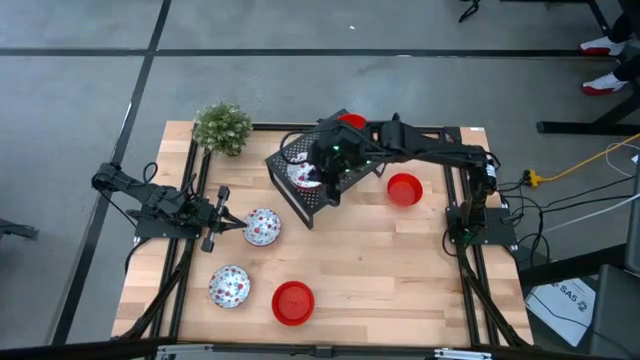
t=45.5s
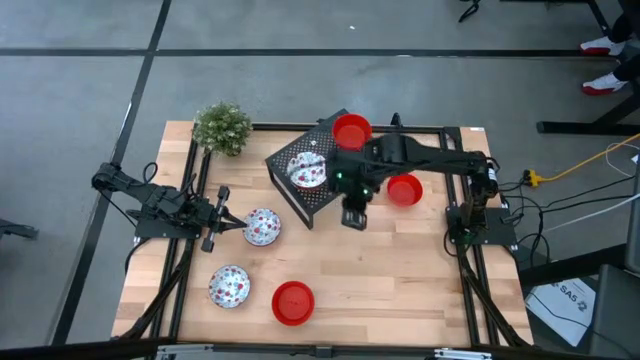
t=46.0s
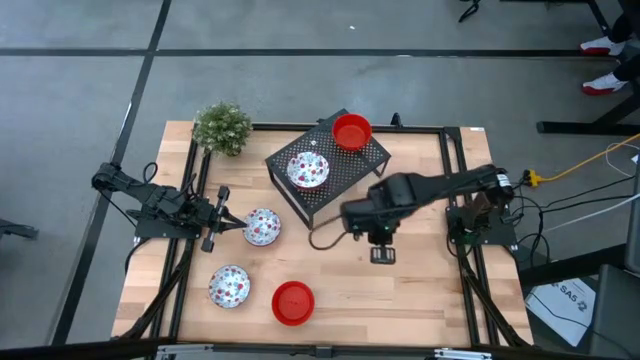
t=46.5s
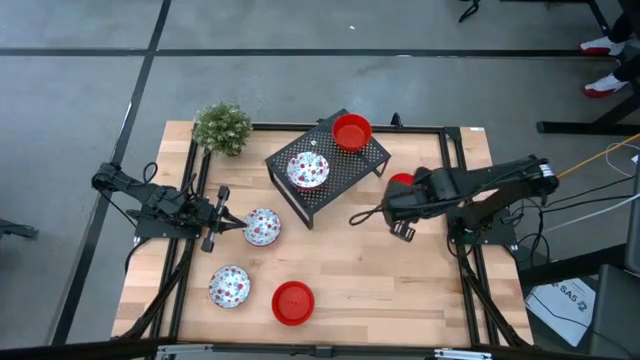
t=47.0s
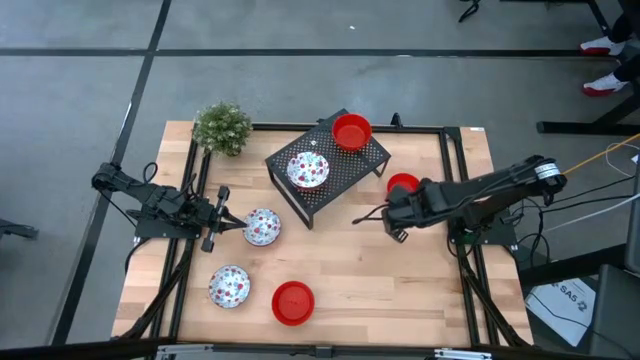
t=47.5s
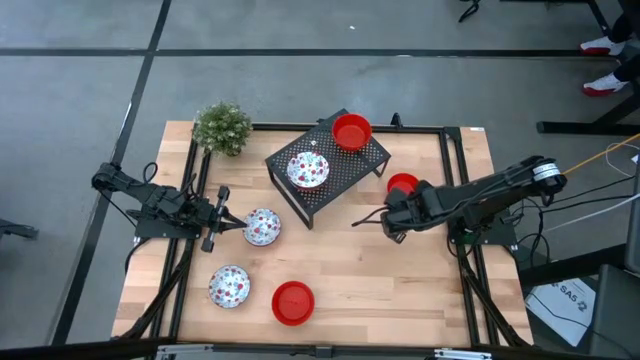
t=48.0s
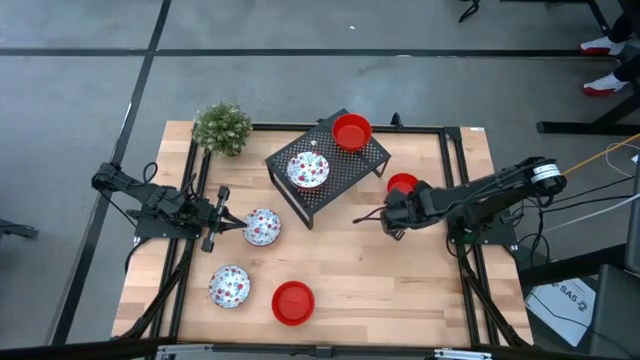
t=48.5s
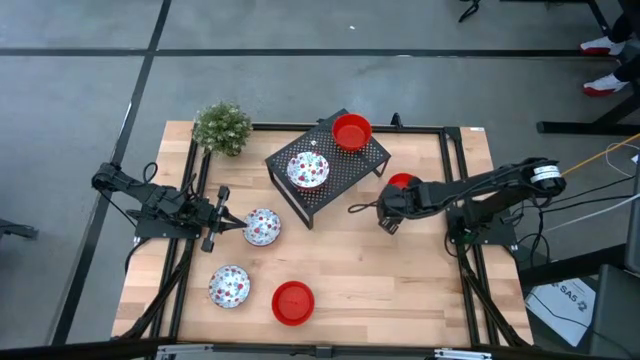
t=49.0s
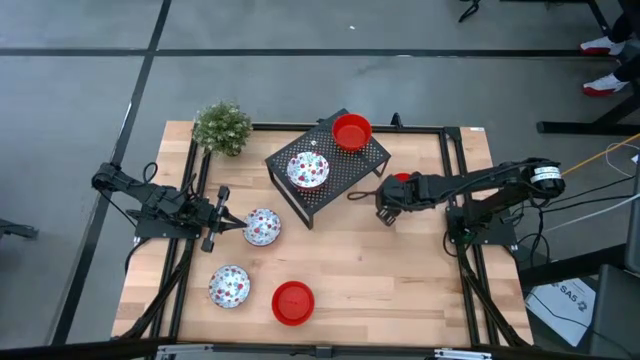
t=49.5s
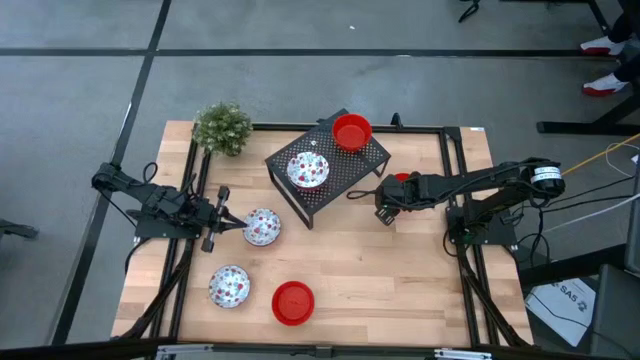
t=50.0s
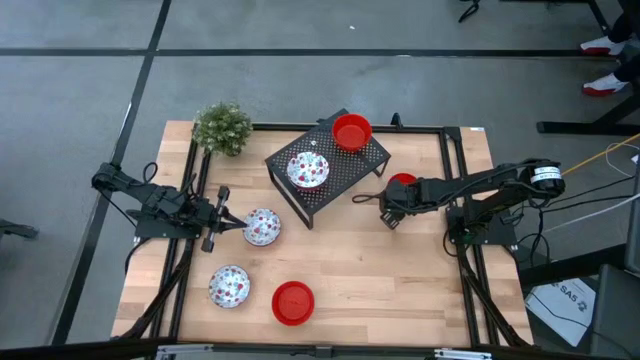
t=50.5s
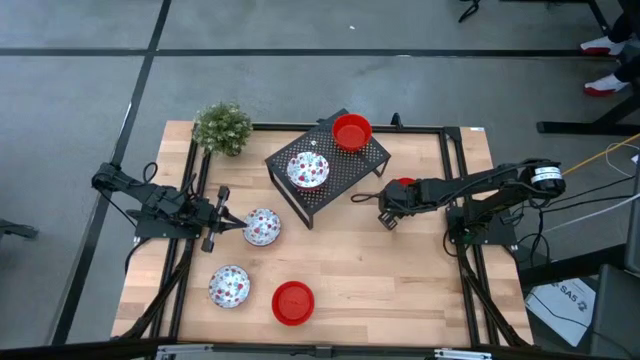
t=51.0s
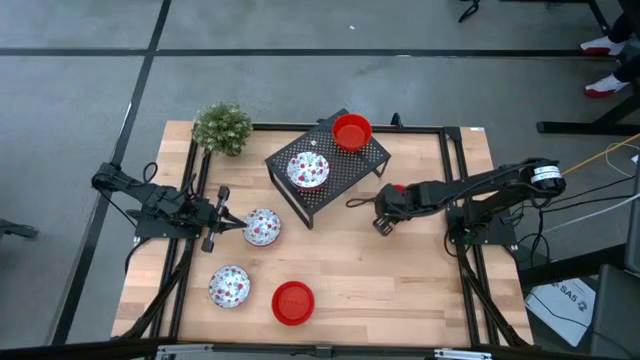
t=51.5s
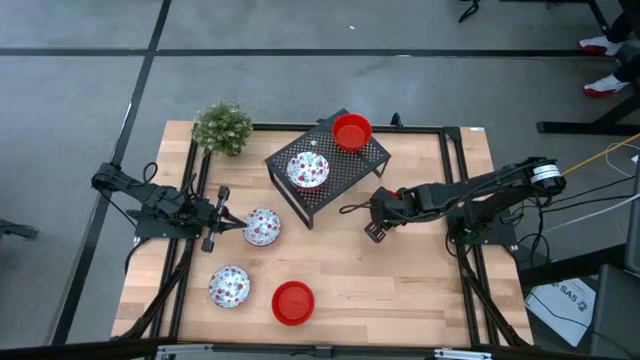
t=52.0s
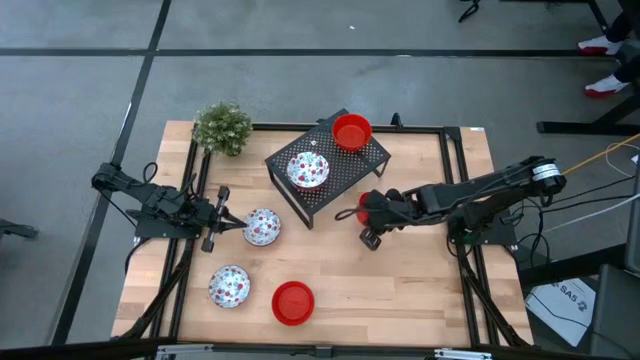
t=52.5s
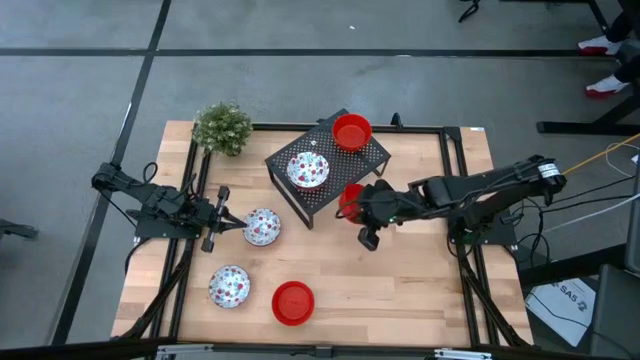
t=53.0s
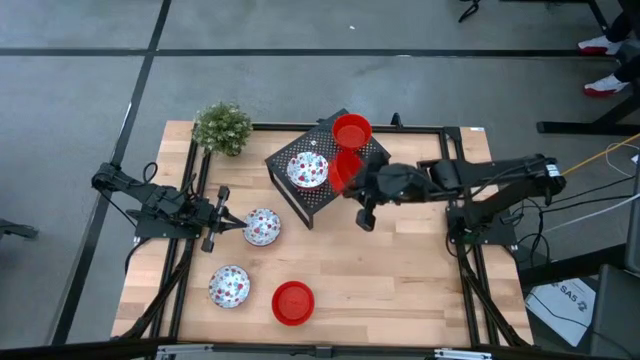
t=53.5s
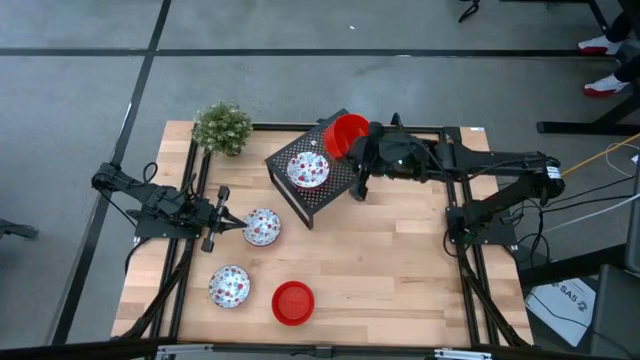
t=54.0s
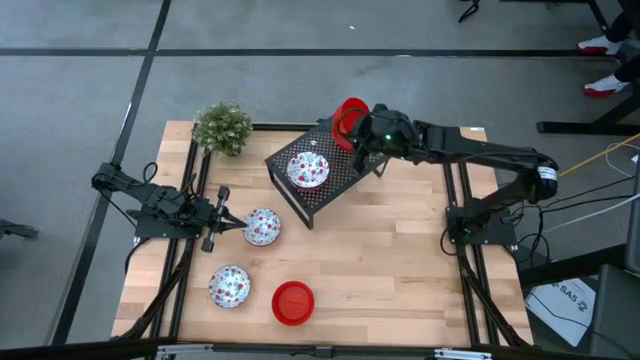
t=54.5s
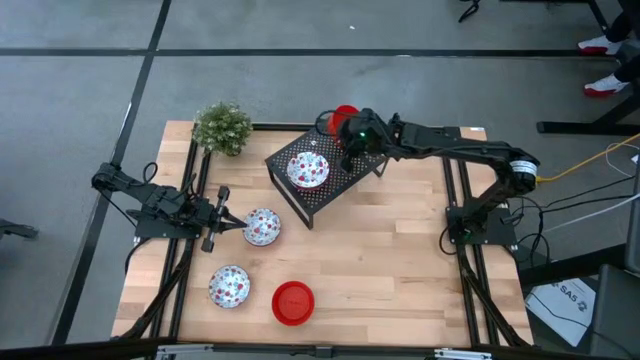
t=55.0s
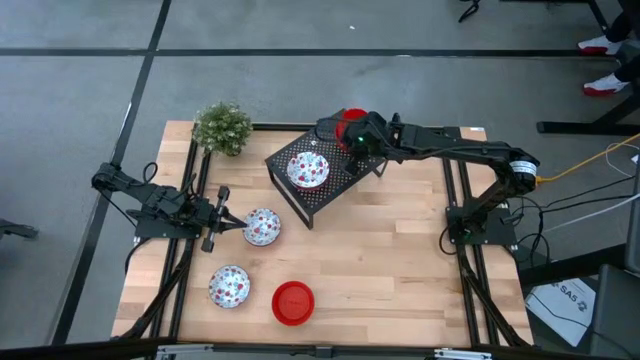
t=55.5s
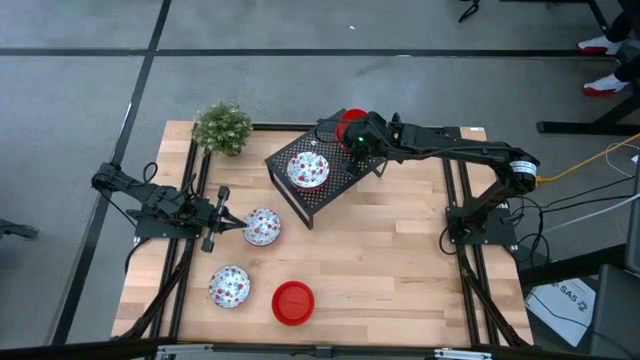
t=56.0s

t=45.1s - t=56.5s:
Task: Pick & Place Mini bowls
Stack the red bowl on the red bowl on the shelf

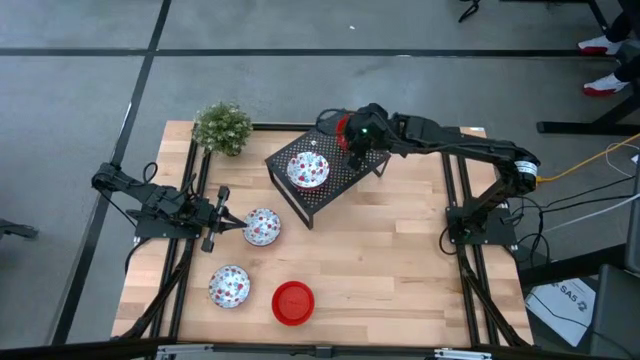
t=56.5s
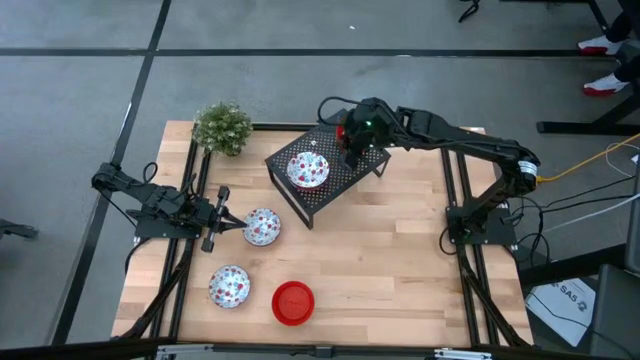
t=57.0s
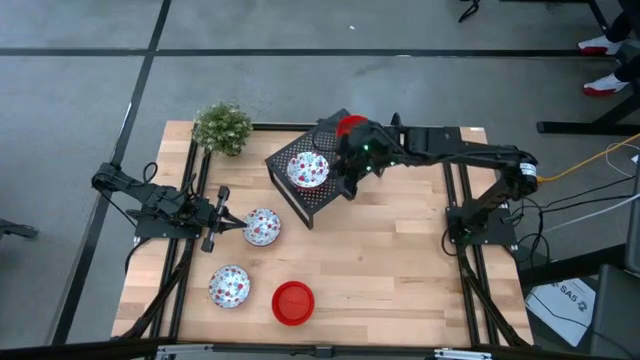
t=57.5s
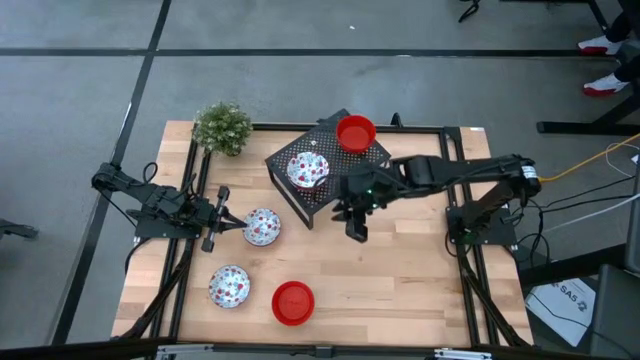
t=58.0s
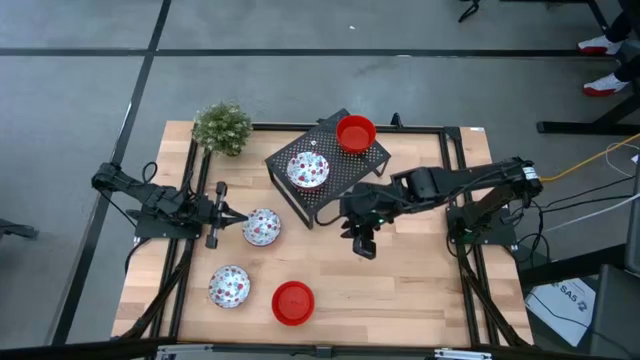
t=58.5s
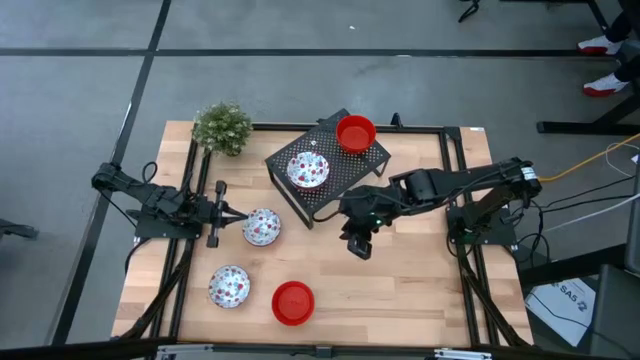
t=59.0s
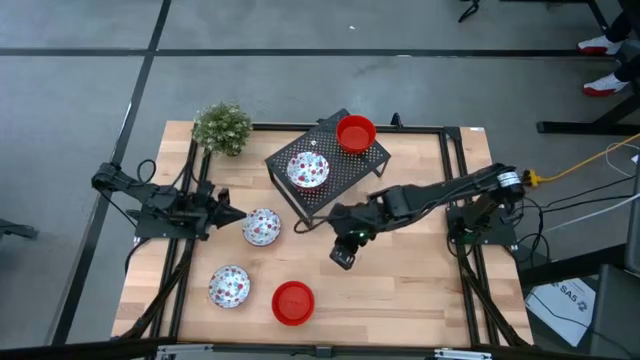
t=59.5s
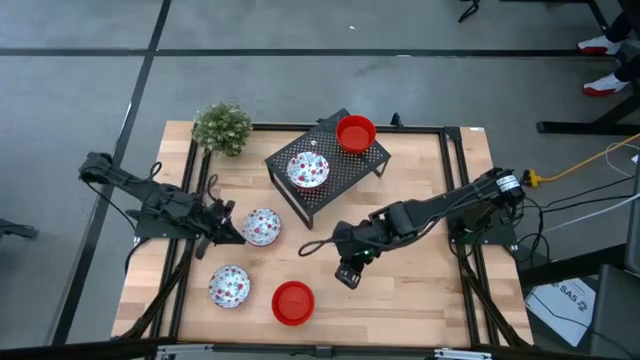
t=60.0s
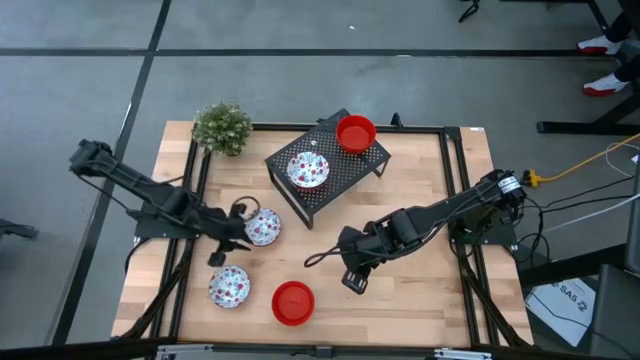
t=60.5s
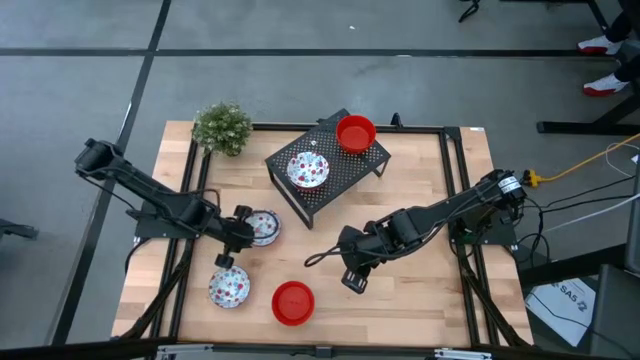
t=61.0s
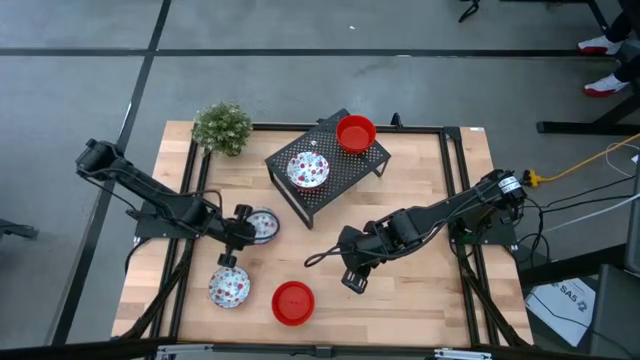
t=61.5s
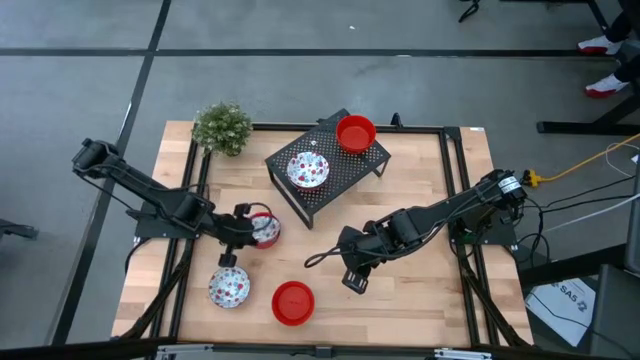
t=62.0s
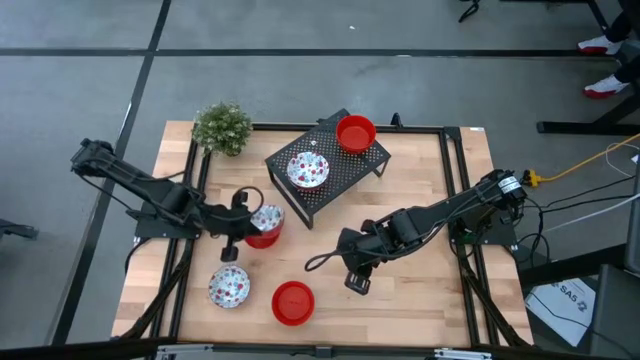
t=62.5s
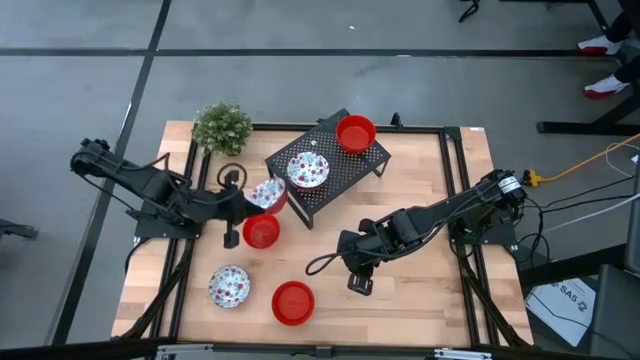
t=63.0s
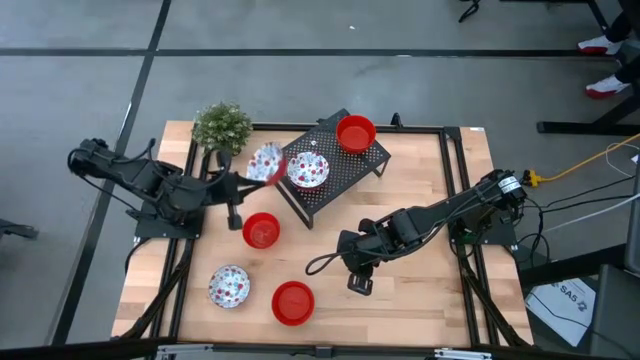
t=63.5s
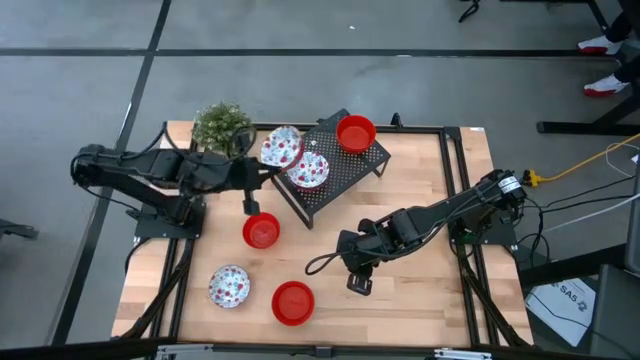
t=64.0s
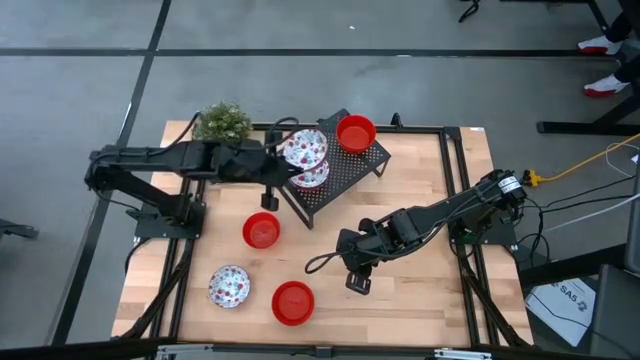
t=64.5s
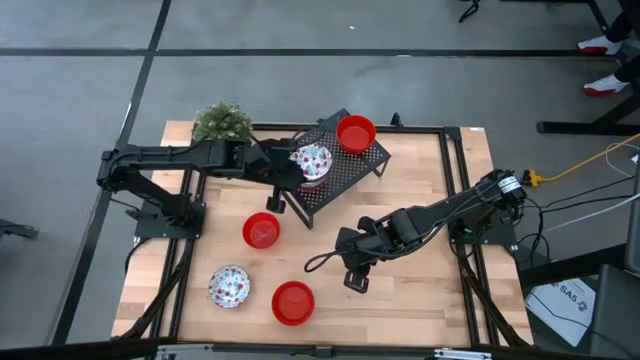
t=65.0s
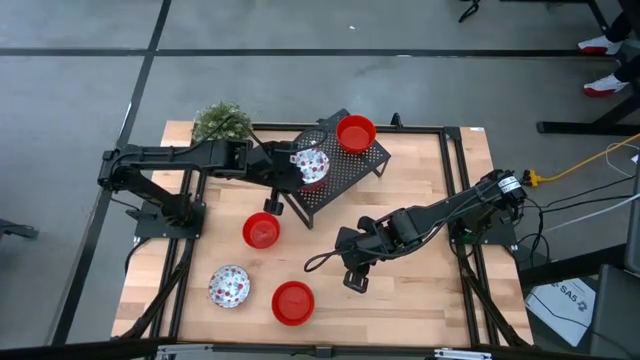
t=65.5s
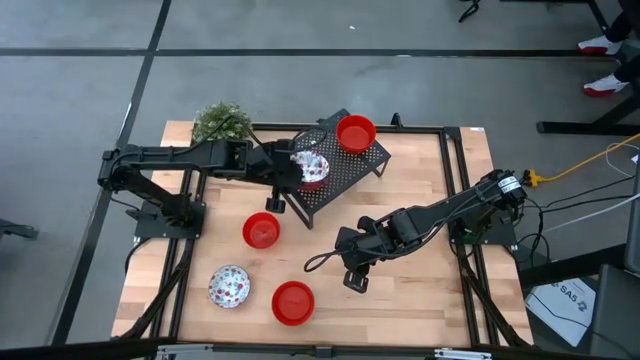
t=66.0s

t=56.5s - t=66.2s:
Stack the white patterned bowl on the white patterned bowl on the shelf

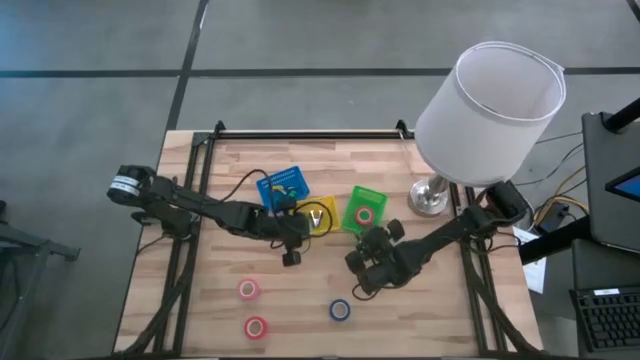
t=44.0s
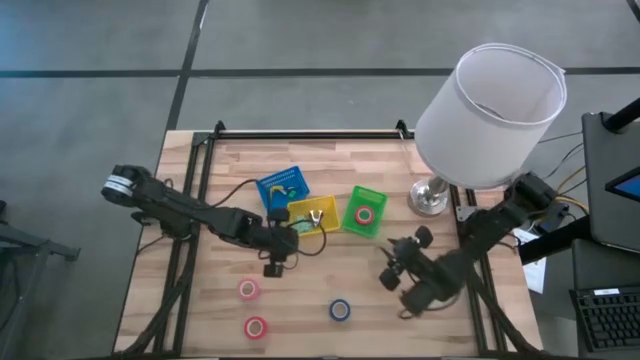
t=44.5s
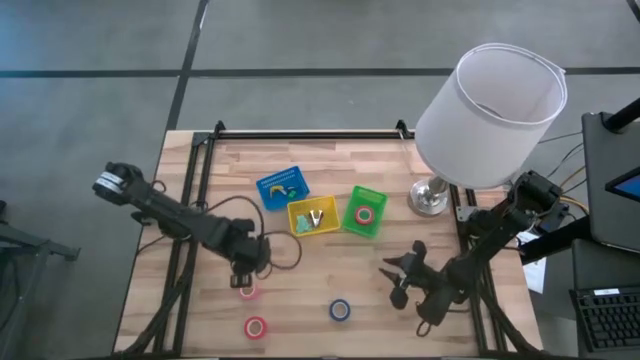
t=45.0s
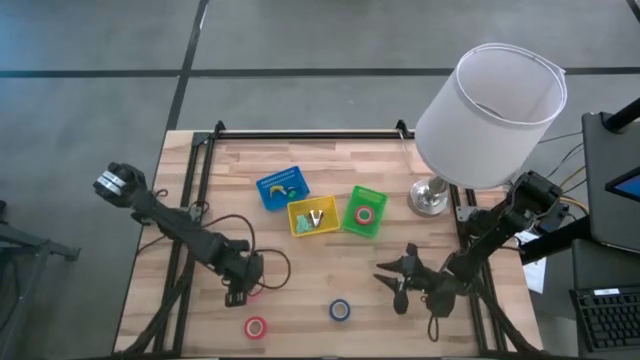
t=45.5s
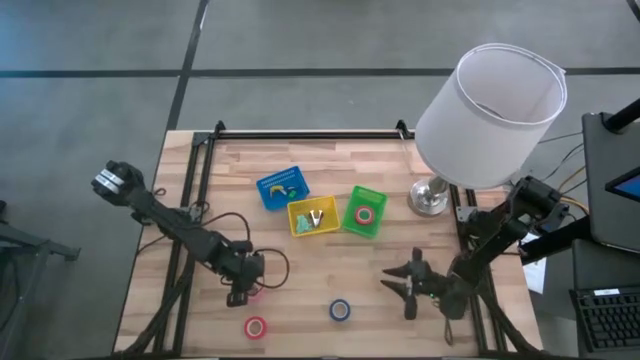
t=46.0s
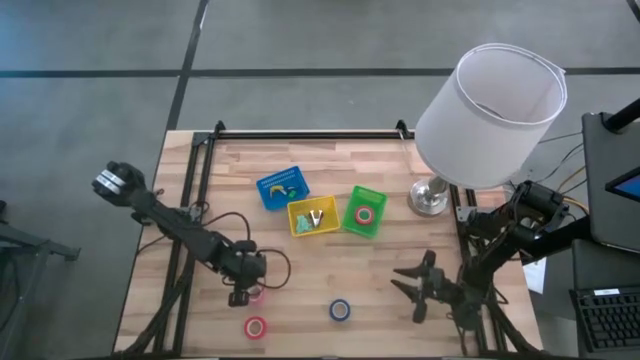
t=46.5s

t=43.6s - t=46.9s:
Task: Pick and place Stapler, Stapler remover, tape
Put the pink tape into the green bin
